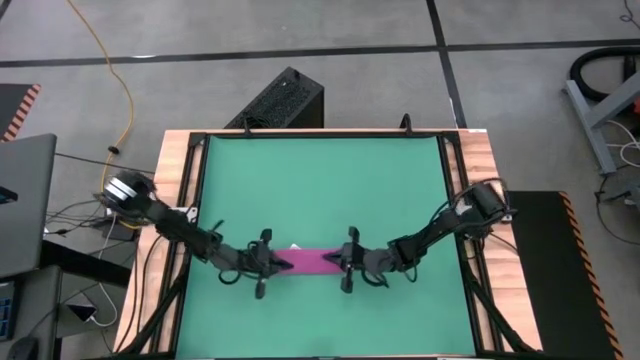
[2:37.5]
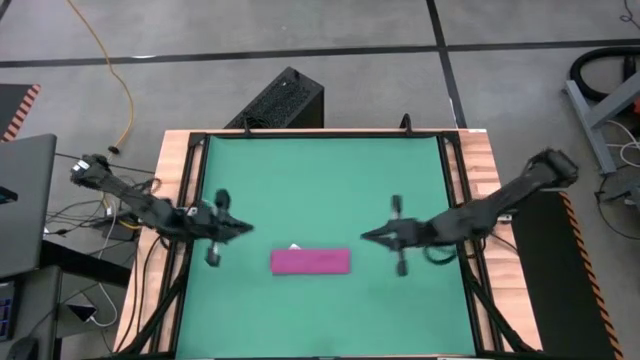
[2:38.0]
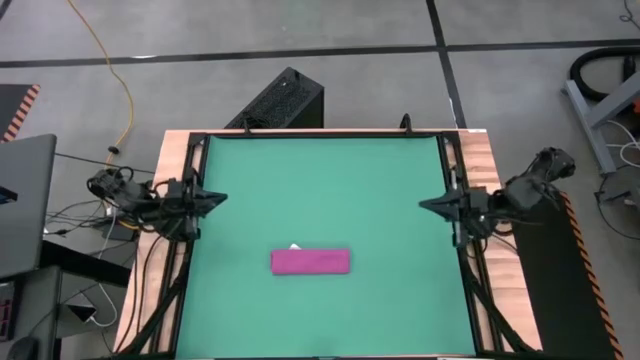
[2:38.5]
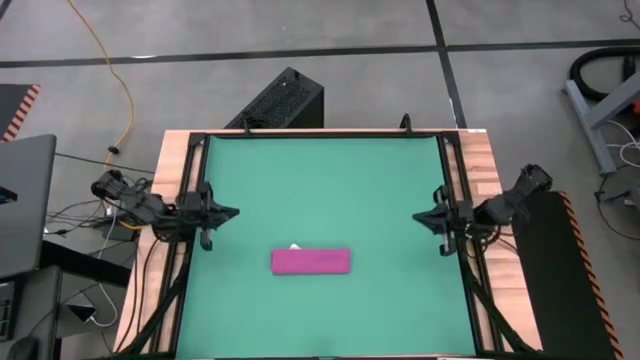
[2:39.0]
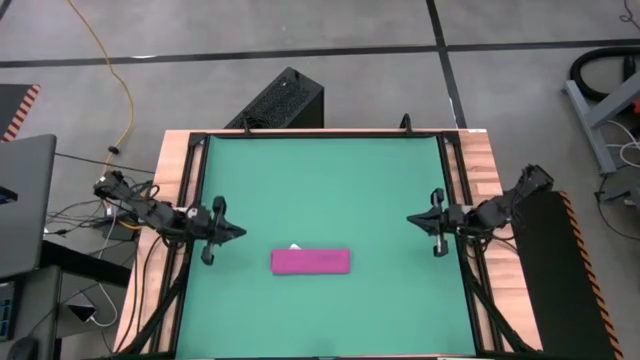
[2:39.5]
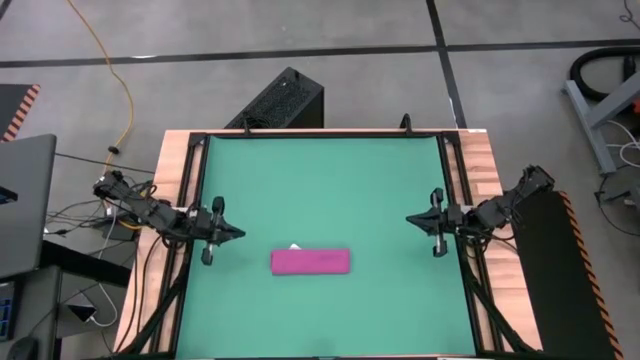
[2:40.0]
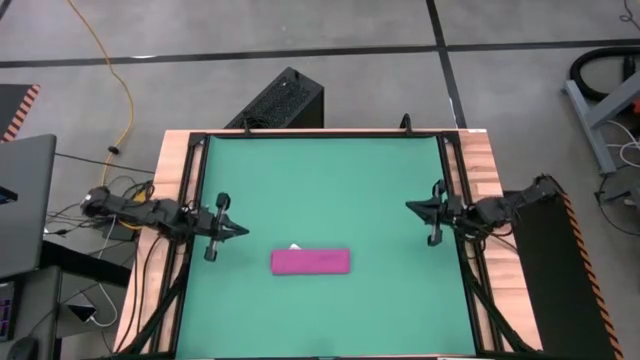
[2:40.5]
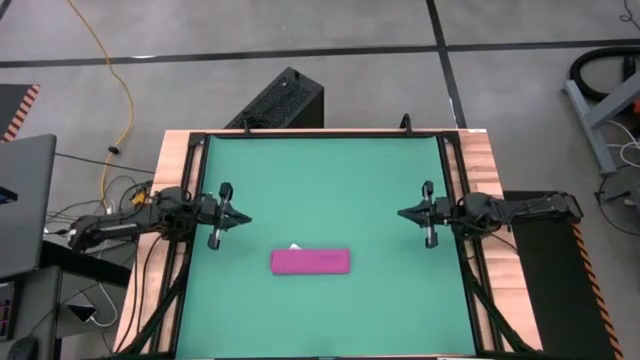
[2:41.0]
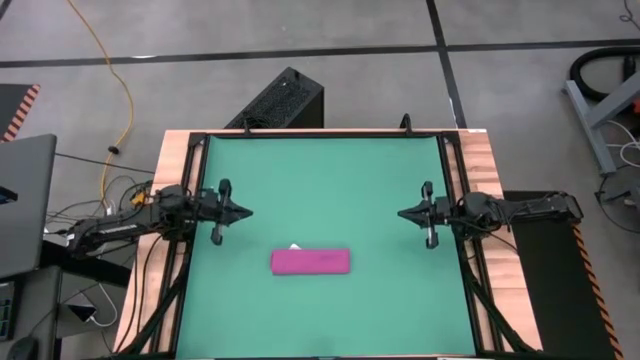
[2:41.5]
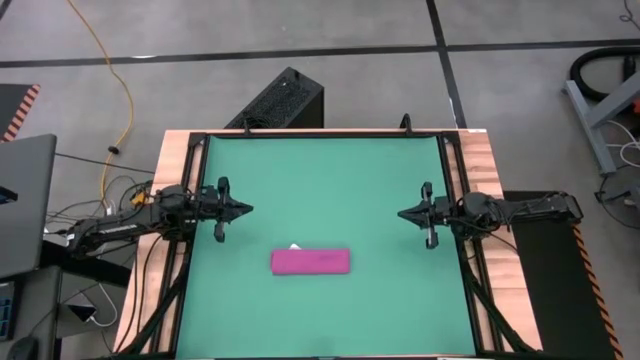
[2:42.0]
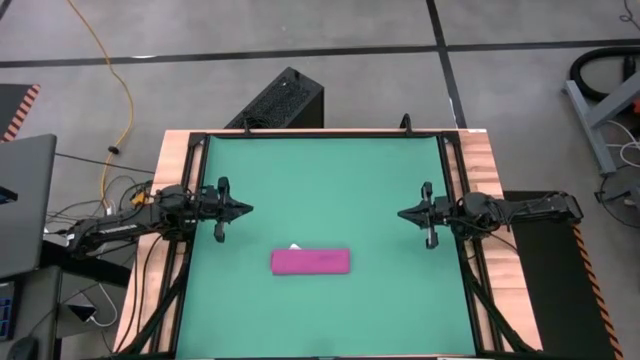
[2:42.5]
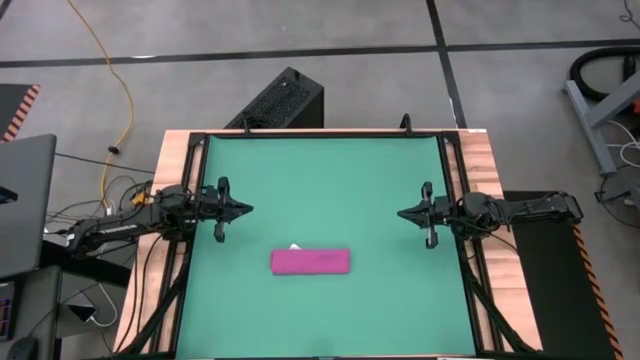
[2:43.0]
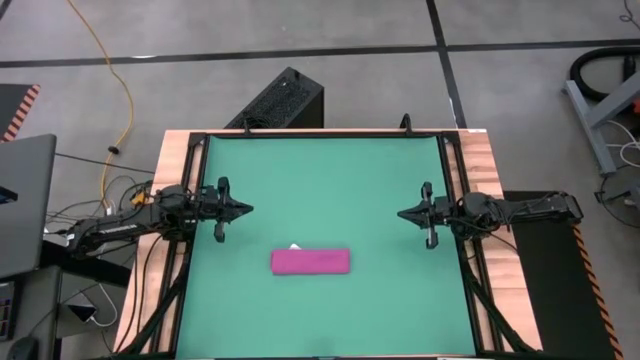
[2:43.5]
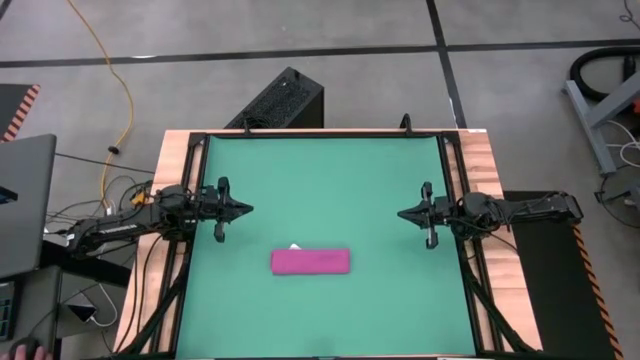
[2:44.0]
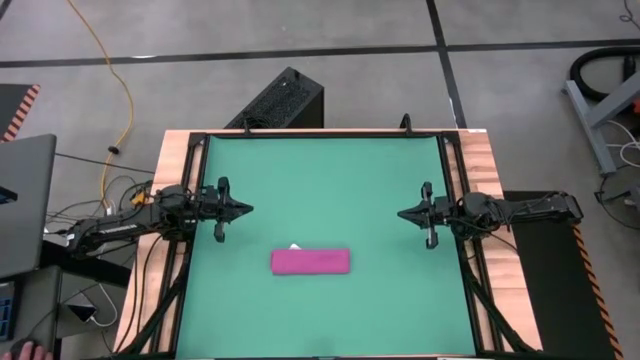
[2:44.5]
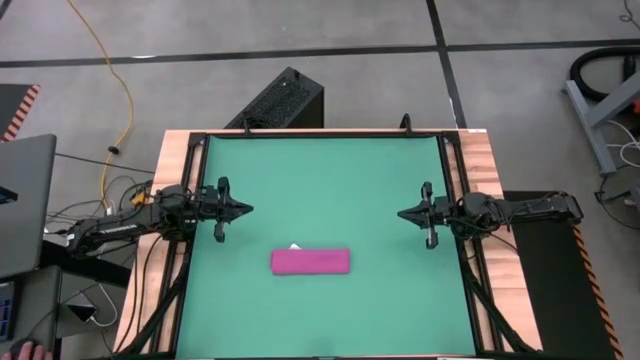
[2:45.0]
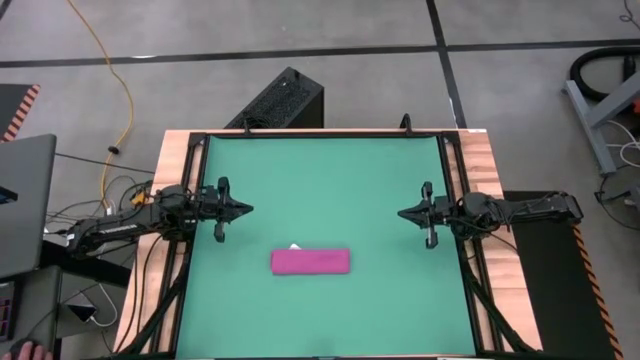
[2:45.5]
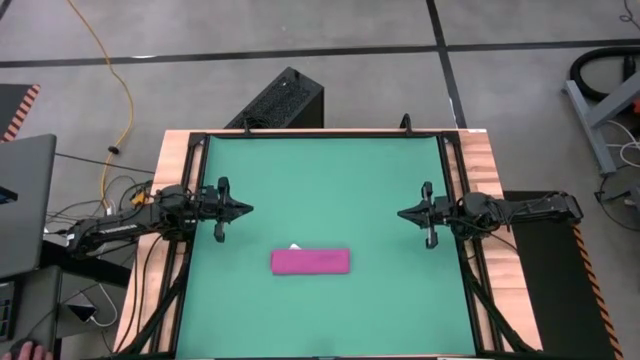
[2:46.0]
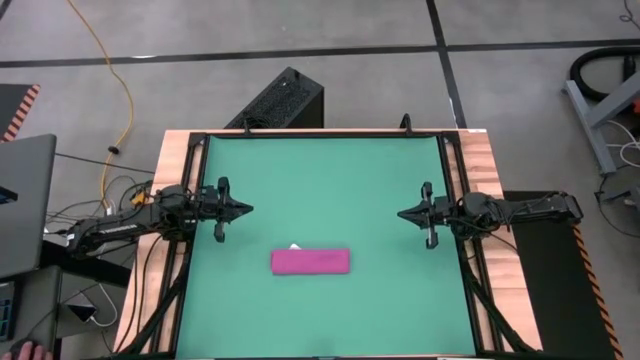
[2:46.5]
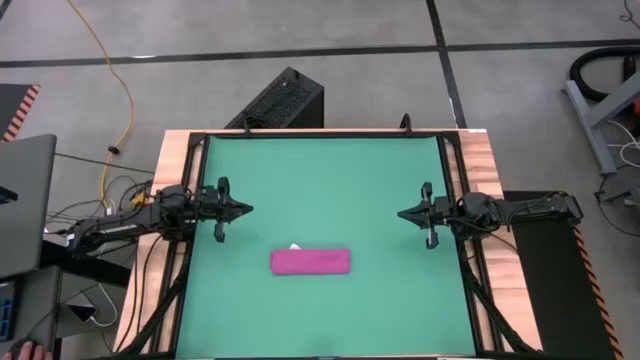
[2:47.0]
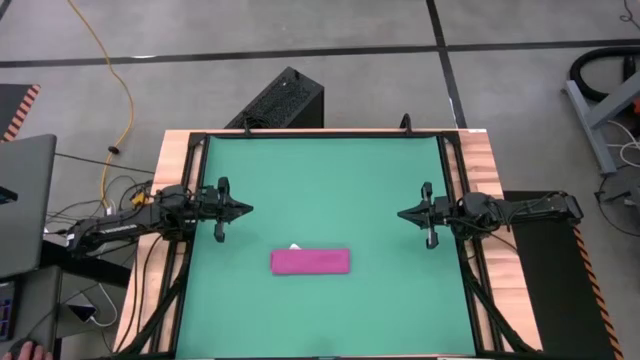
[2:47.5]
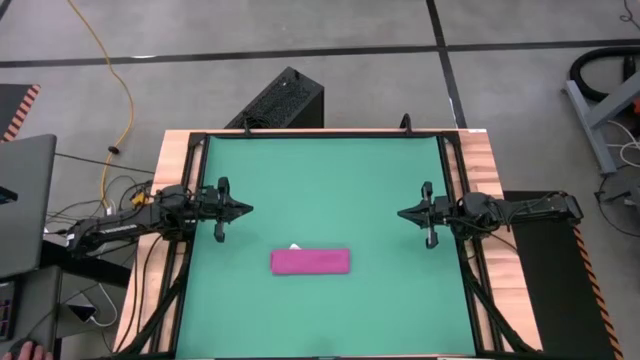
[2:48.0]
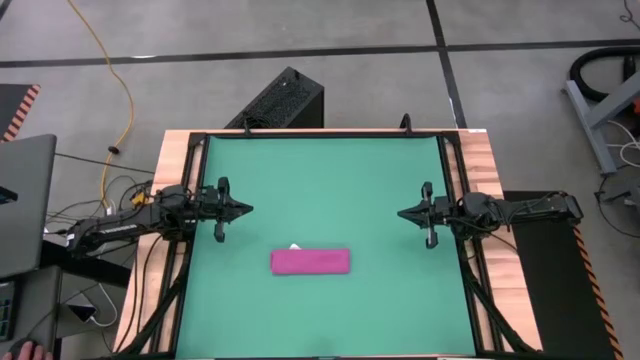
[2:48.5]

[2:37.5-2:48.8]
Task: Roll towel
Return to Home Position

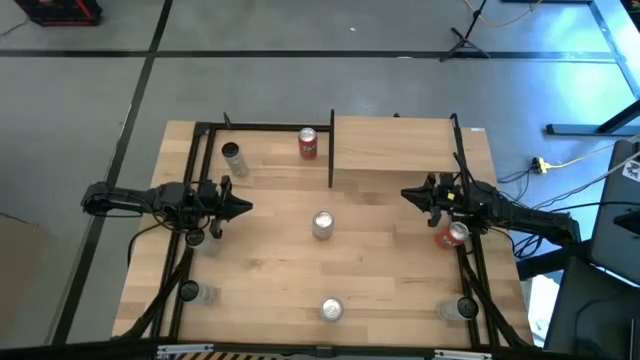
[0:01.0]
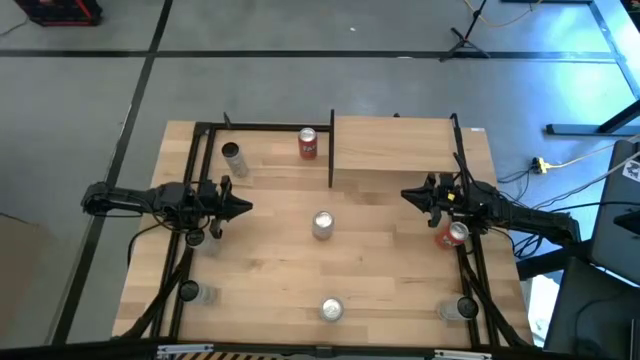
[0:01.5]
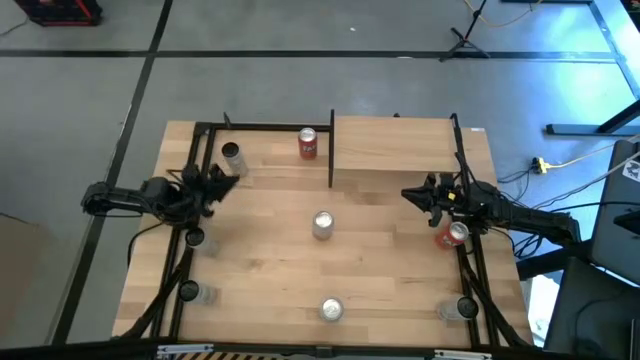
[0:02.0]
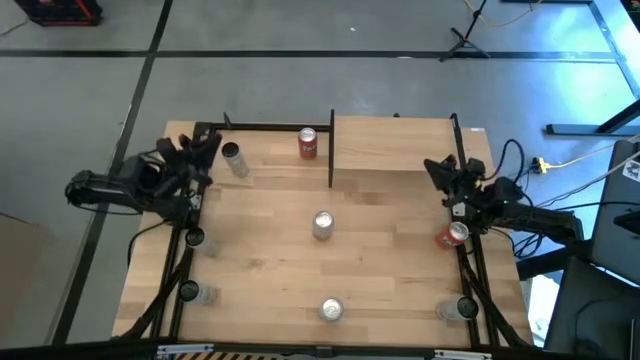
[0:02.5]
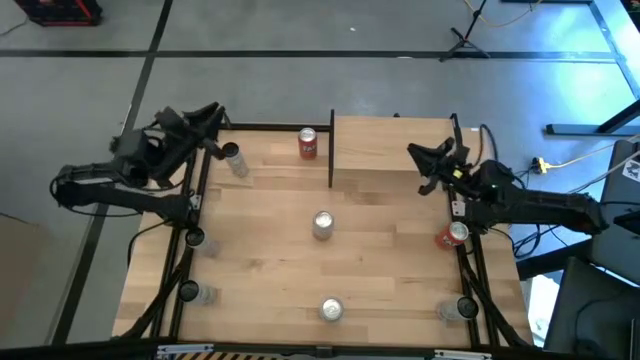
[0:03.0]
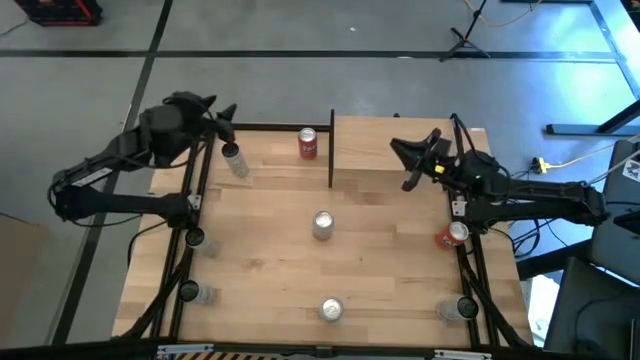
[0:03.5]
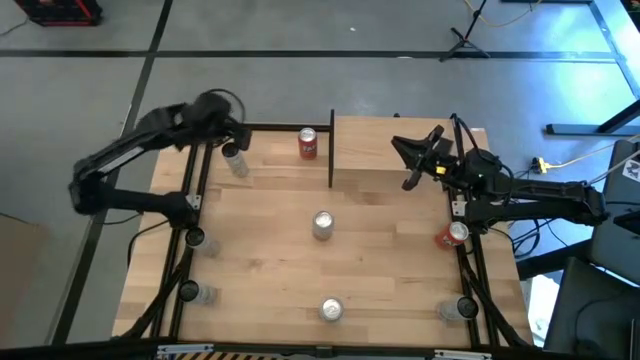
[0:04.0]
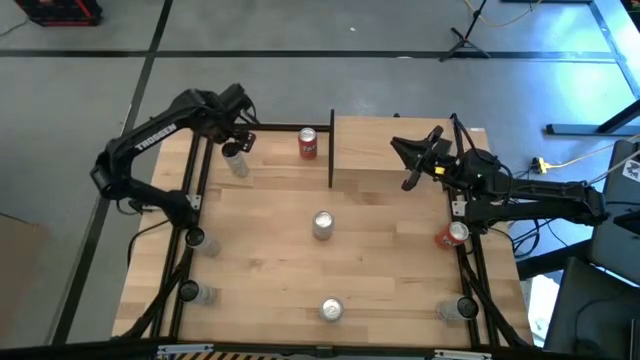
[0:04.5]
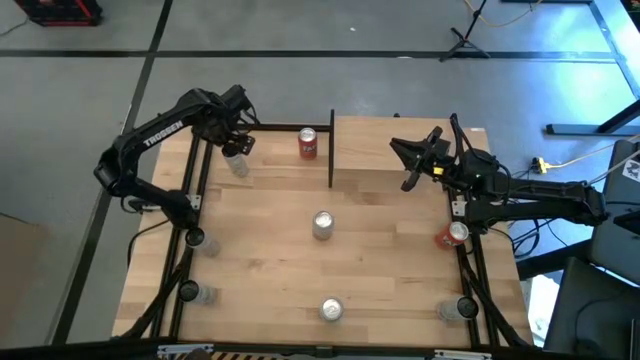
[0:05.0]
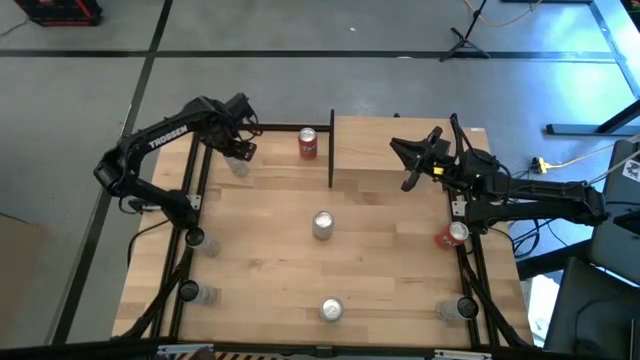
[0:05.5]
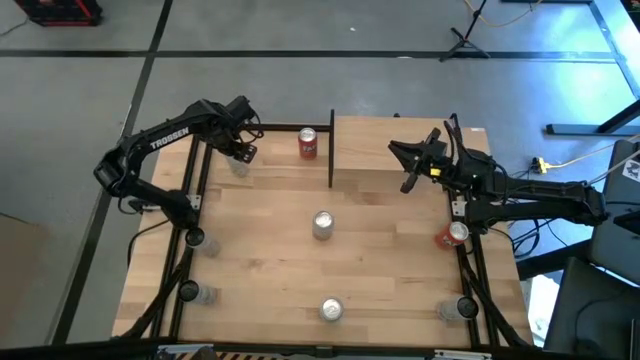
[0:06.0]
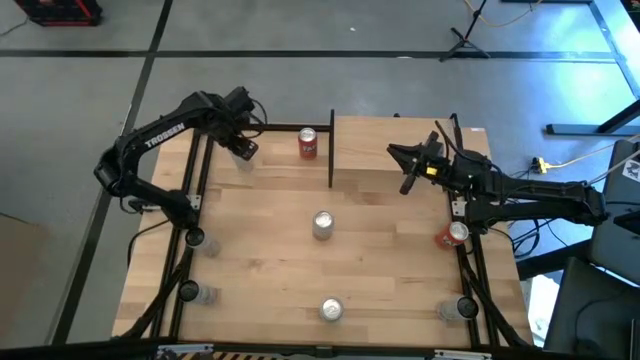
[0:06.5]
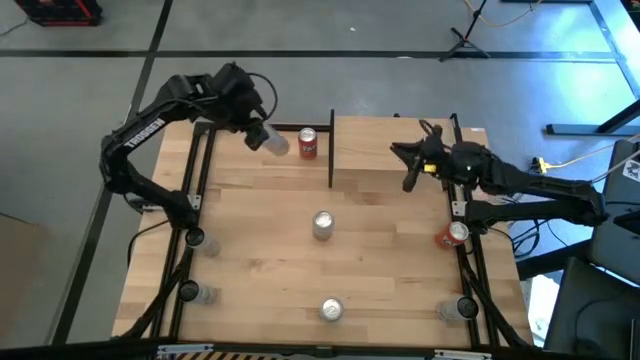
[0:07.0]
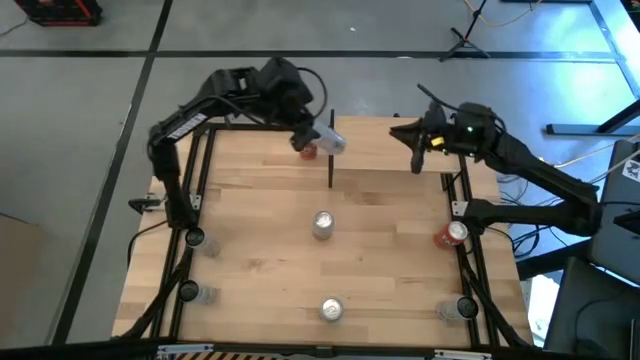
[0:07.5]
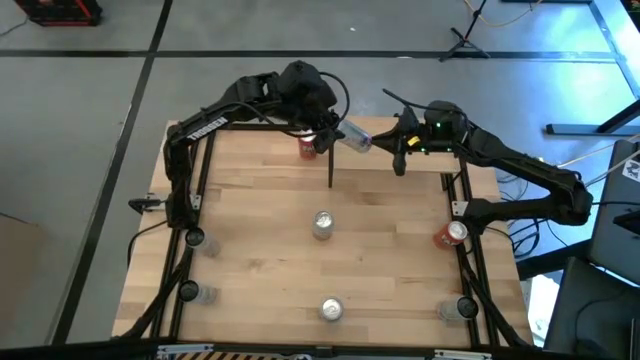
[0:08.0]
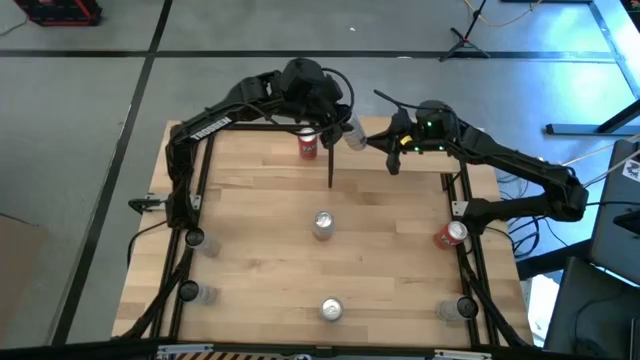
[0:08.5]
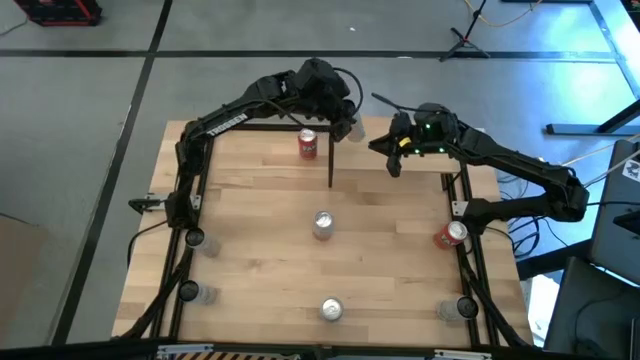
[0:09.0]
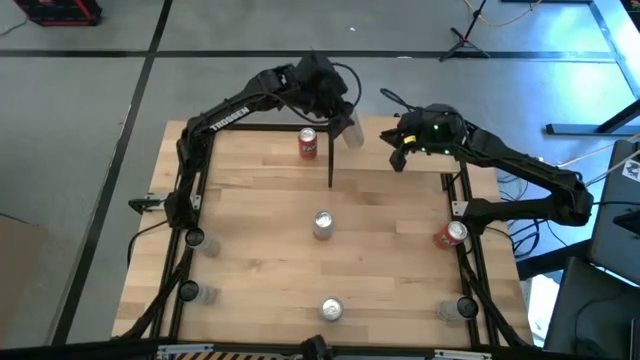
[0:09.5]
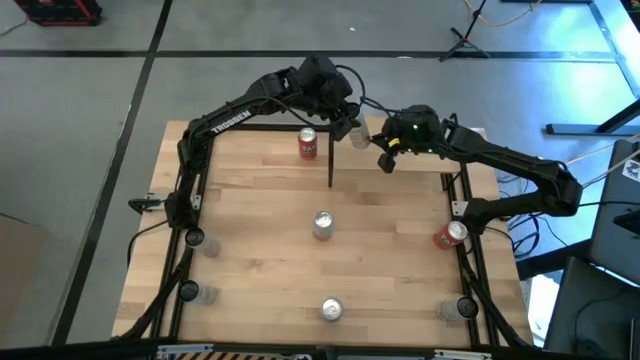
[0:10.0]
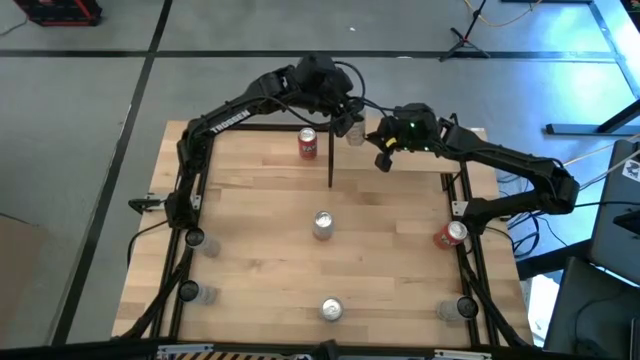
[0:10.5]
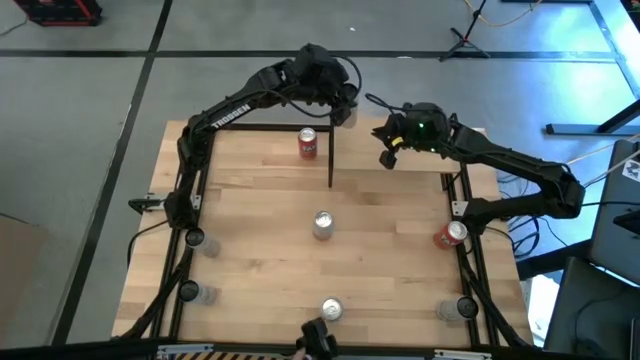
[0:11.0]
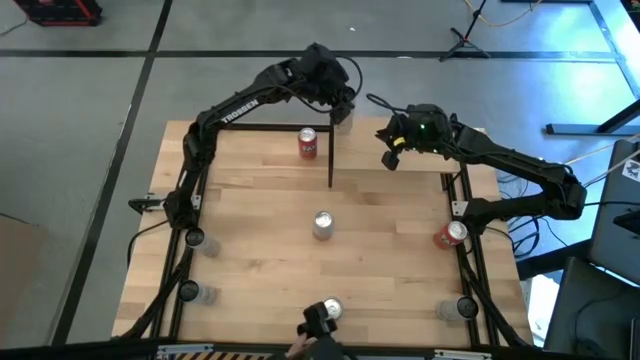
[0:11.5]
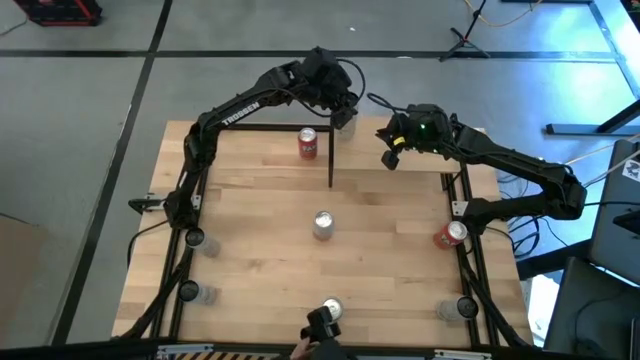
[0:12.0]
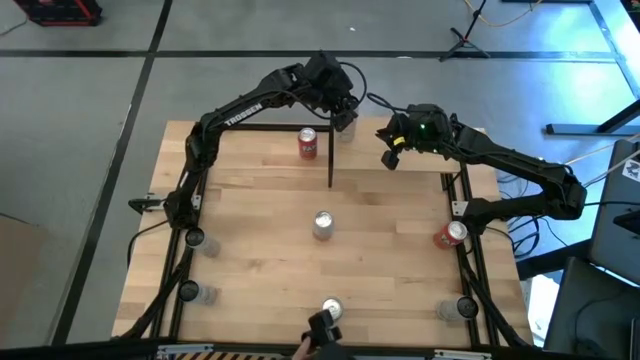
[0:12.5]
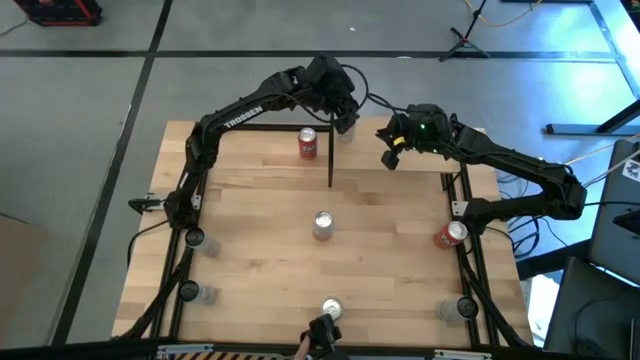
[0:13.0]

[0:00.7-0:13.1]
Task: Place canned beverage on shelf
Put the top left black soda can onto the shelf
